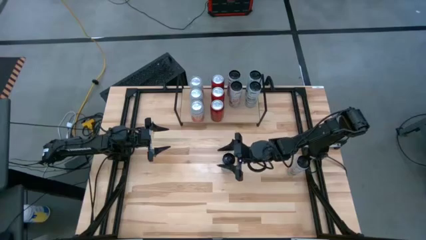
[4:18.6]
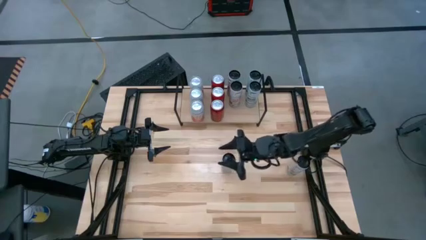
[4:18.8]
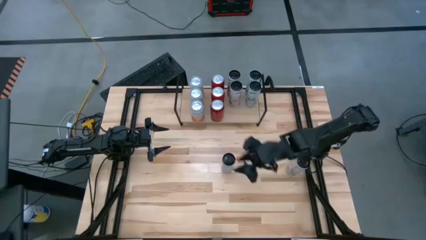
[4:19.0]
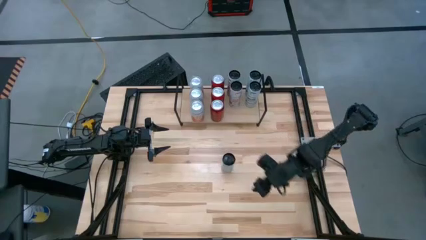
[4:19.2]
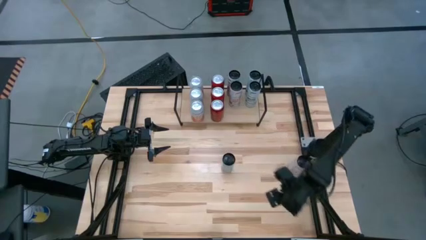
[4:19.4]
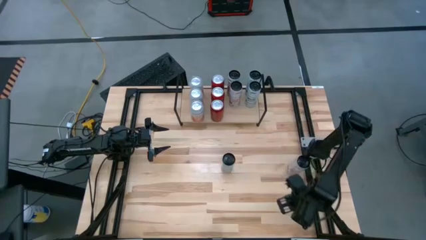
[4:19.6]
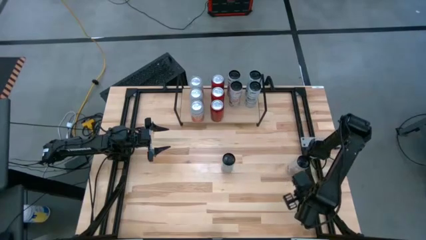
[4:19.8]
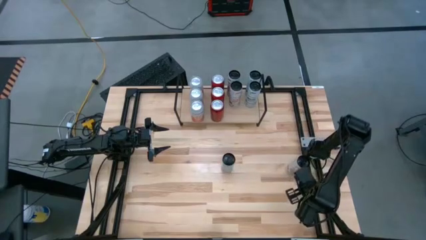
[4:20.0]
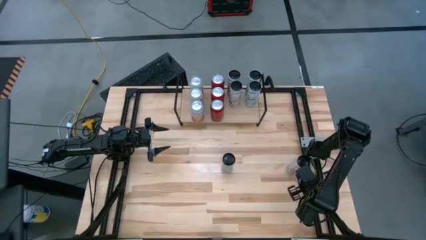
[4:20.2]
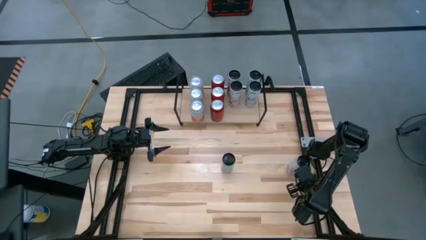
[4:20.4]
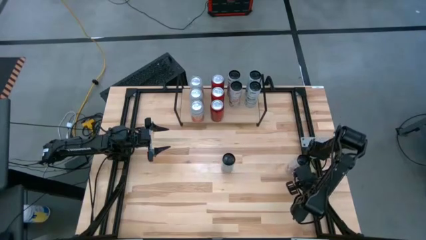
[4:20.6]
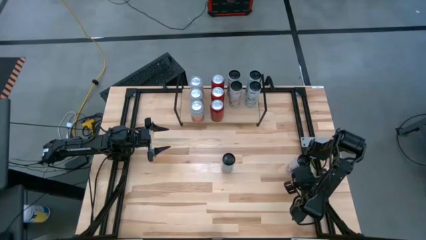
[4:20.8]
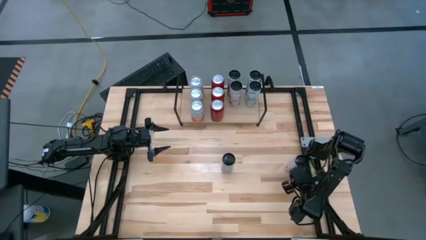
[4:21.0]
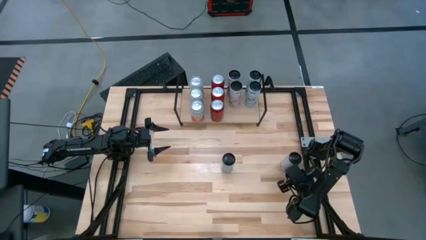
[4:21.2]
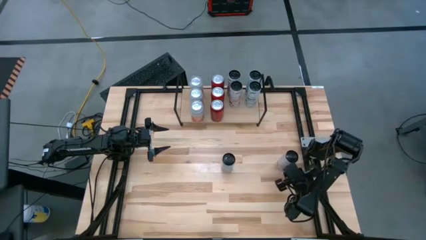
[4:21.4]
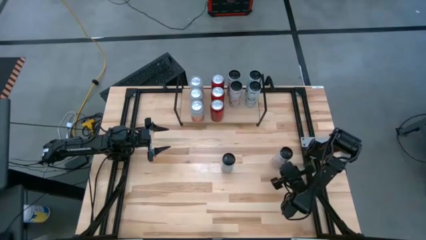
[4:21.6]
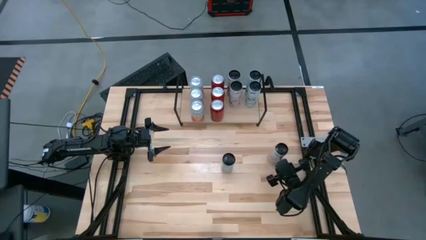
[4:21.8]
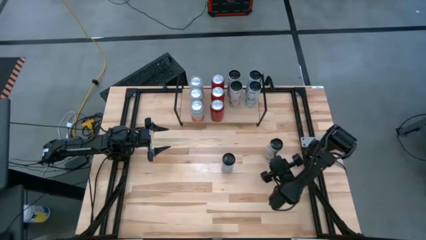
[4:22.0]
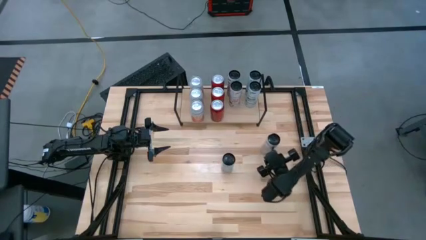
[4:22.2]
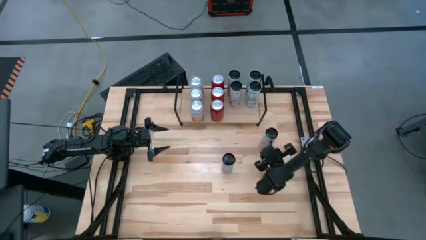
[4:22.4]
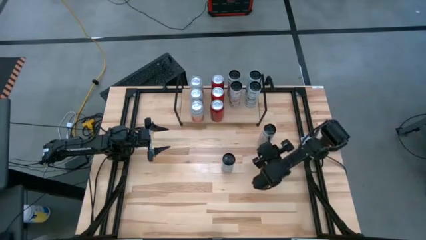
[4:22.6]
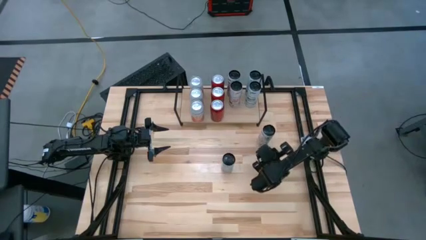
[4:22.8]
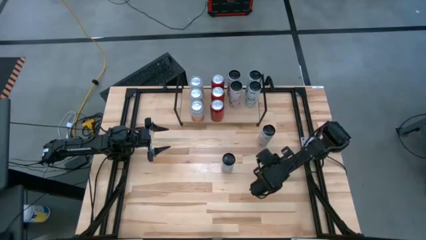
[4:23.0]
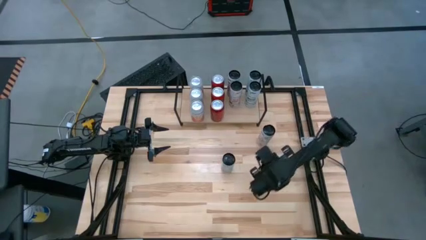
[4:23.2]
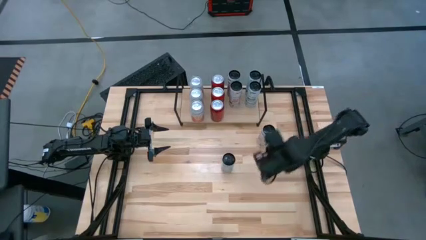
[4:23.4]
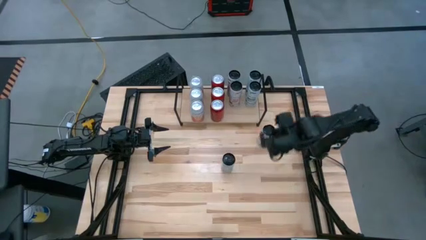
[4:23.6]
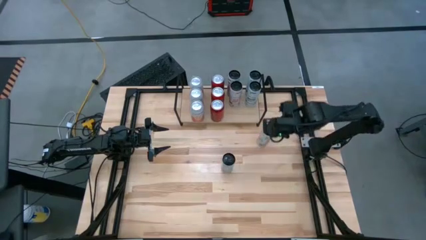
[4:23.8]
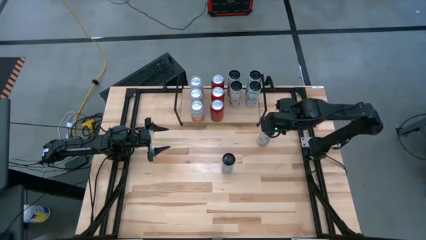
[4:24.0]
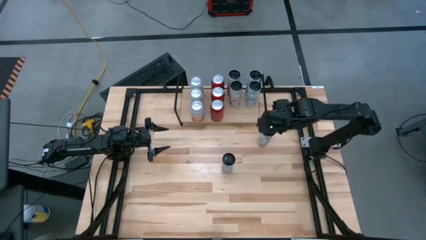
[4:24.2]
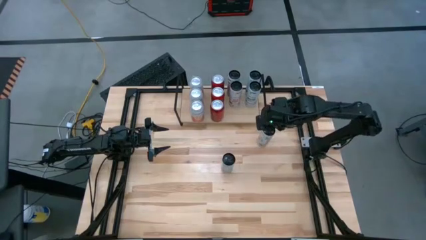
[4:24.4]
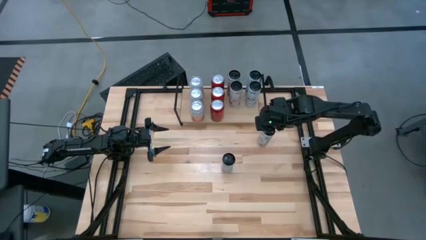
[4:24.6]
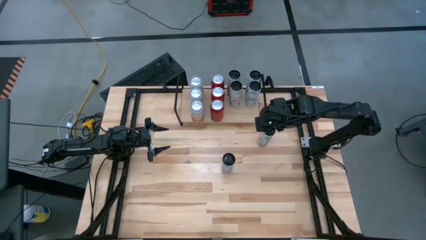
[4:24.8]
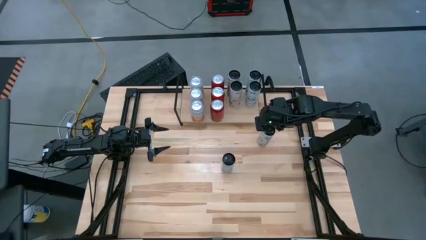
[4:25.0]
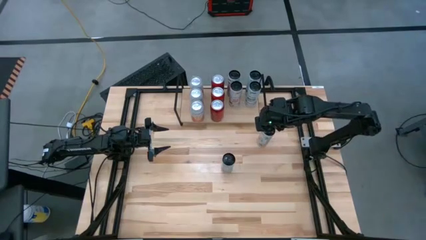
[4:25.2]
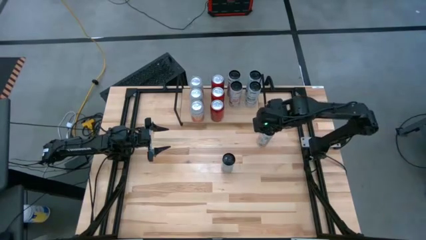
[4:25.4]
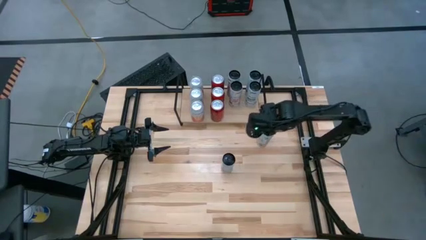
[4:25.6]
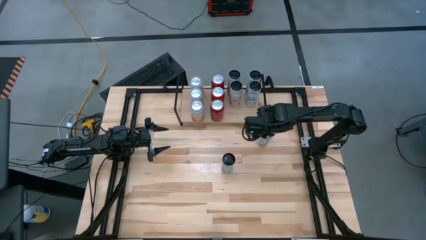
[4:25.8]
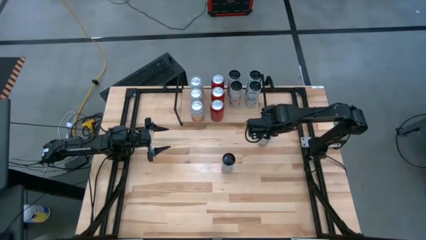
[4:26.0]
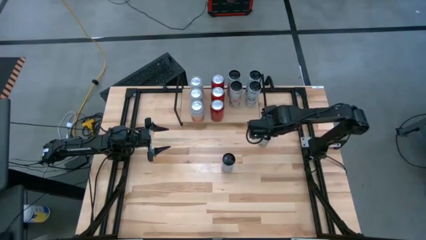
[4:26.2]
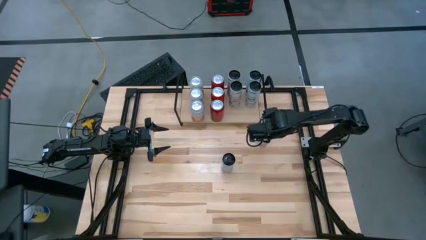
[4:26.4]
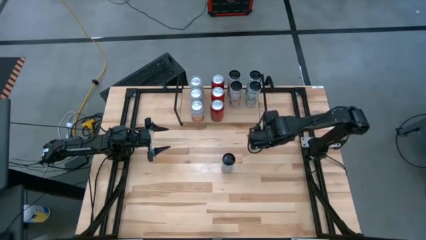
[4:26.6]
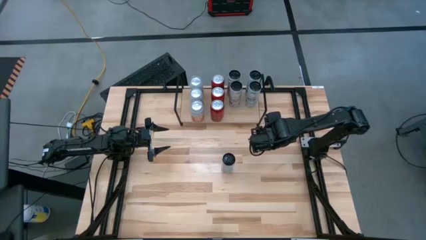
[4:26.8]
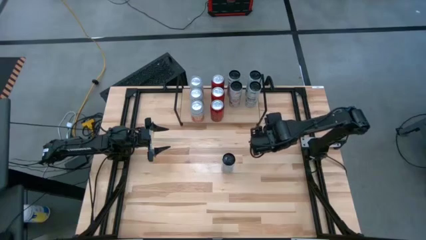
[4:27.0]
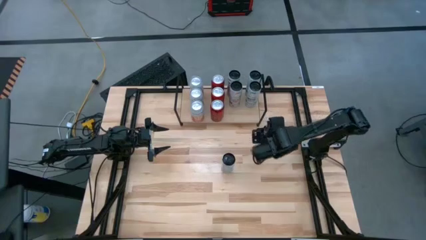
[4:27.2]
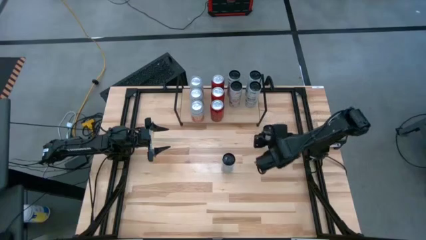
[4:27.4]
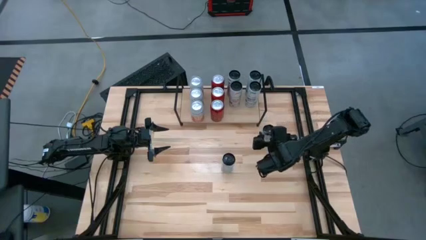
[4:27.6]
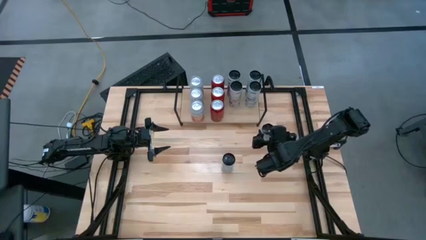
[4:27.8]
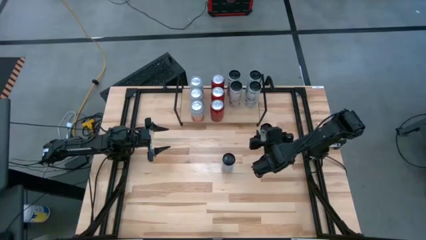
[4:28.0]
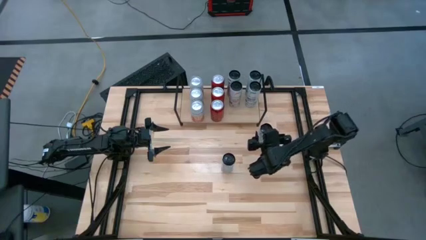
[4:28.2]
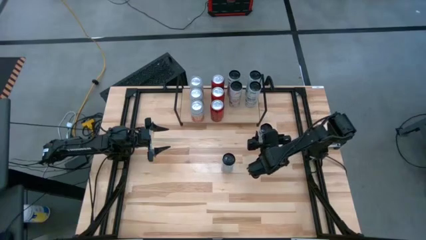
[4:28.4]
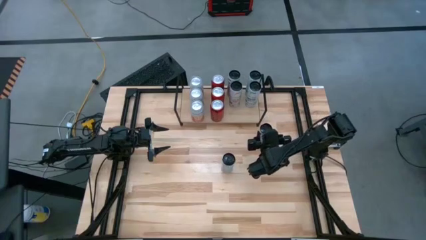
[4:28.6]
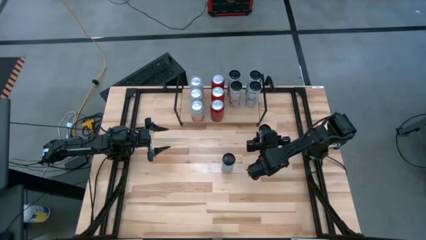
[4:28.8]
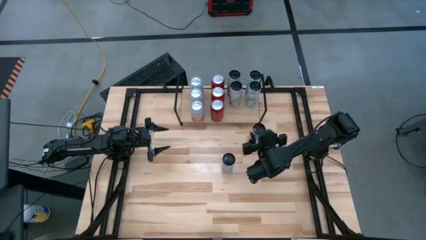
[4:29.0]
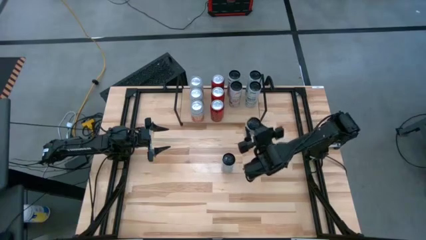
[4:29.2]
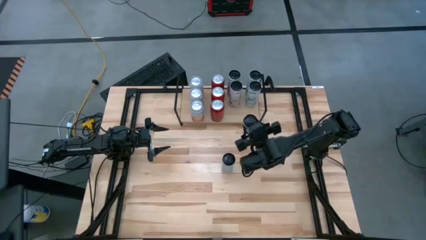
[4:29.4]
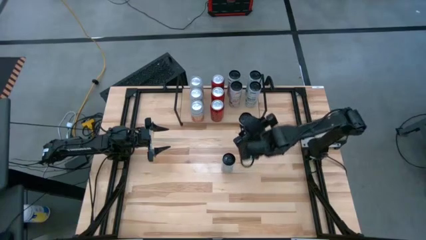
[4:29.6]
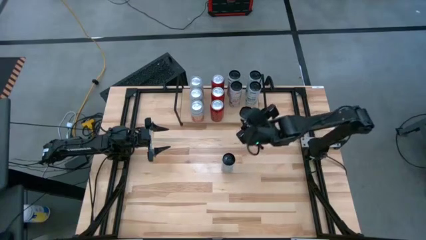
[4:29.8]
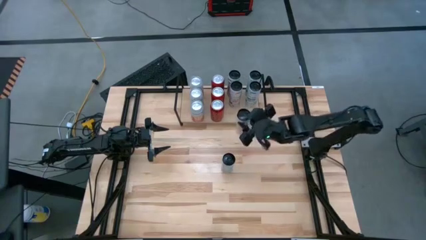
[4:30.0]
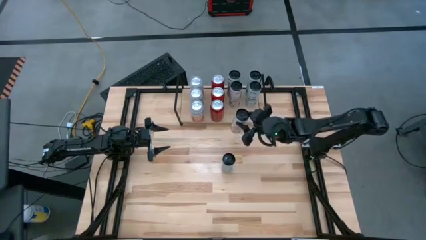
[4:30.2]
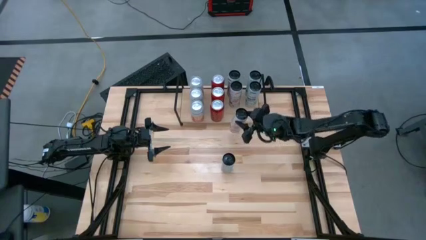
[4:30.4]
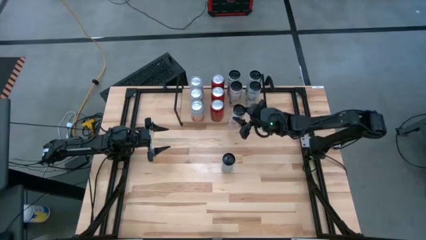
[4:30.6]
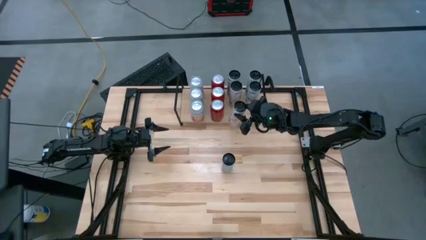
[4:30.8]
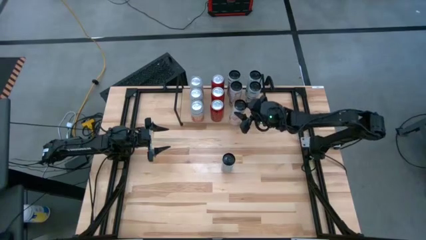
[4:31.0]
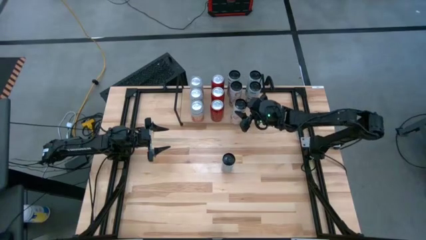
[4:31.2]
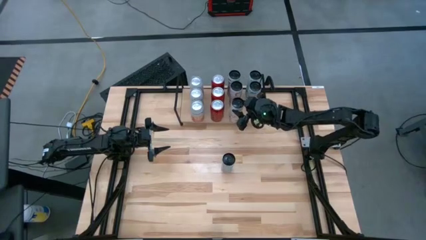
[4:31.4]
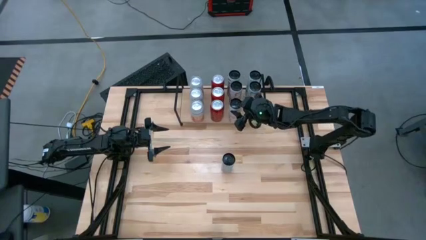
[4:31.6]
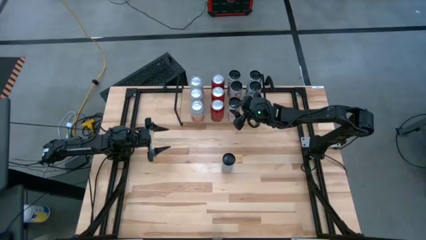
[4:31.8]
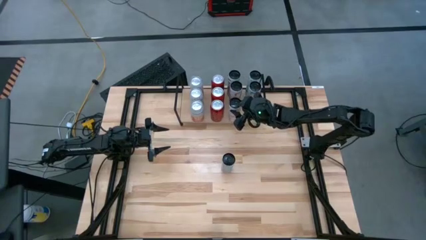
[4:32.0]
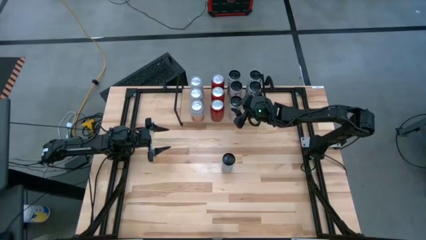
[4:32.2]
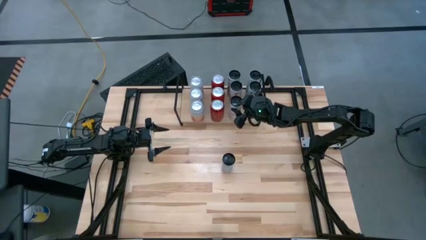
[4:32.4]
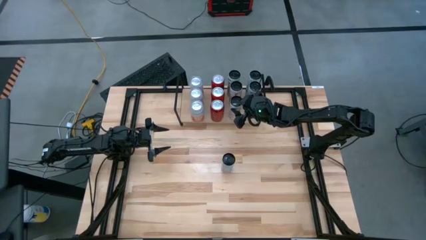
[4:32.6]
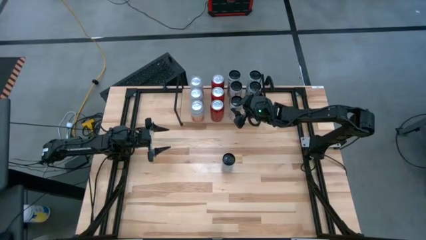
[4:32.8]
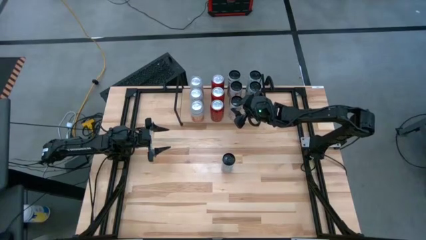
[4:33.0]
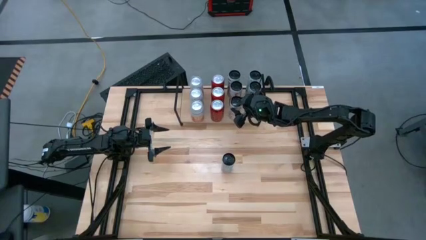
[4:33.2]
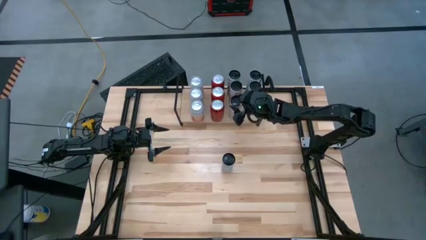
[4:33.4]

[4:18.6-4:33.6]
Task: Place canned beverage on shelf
Put the white pink soda can on the shelf aligned with the other white pink soda cans

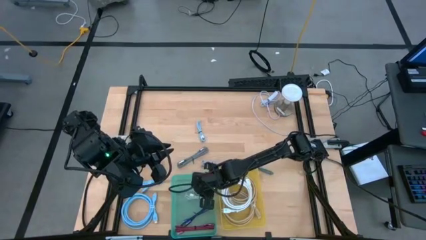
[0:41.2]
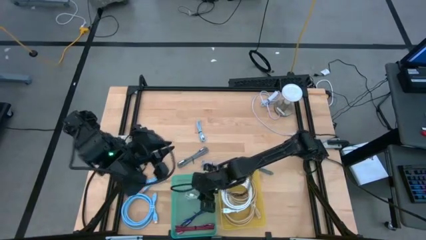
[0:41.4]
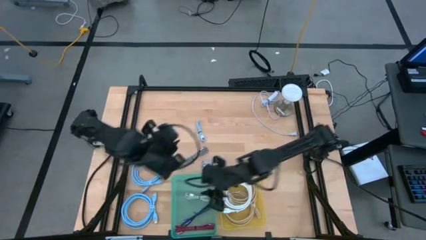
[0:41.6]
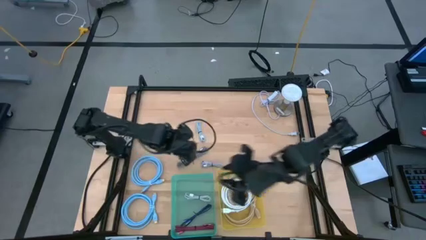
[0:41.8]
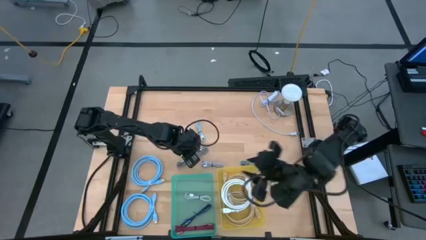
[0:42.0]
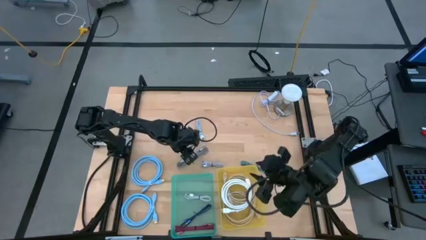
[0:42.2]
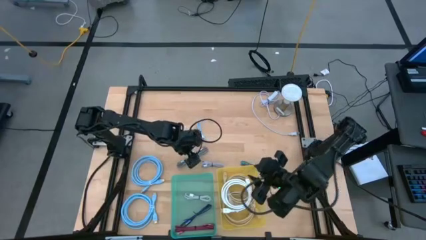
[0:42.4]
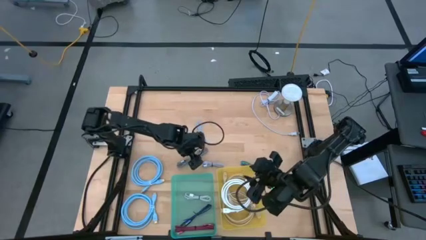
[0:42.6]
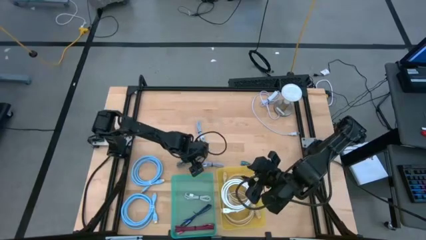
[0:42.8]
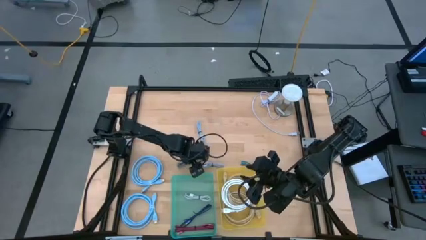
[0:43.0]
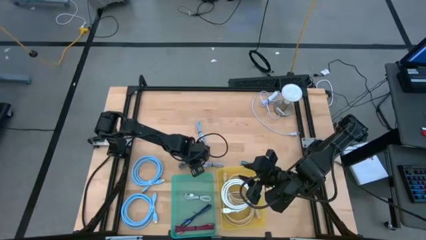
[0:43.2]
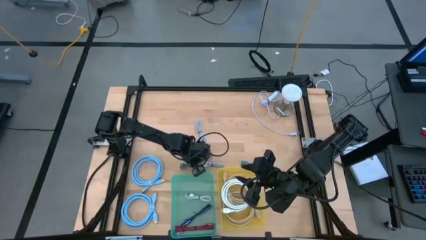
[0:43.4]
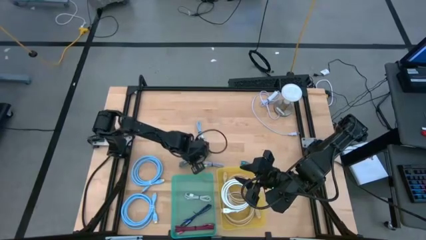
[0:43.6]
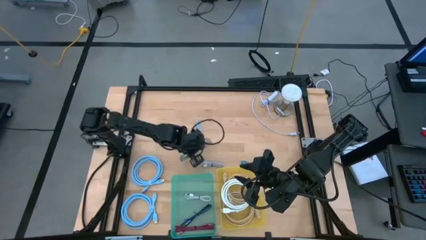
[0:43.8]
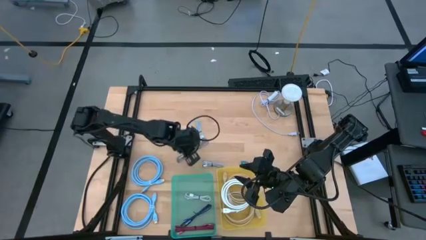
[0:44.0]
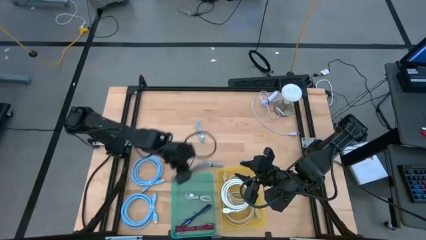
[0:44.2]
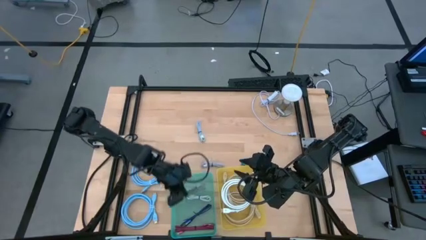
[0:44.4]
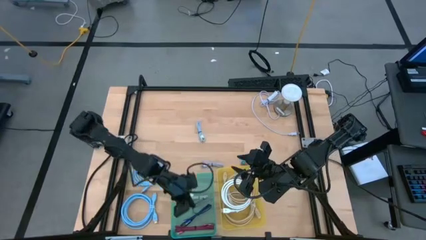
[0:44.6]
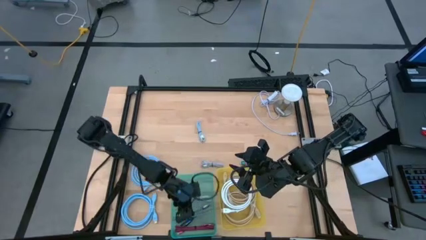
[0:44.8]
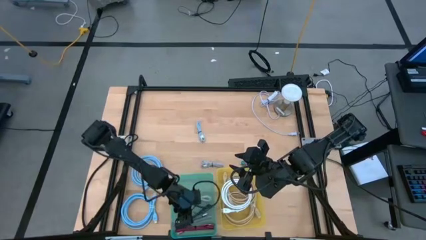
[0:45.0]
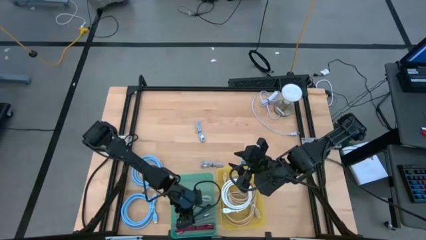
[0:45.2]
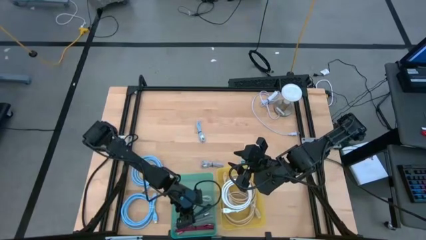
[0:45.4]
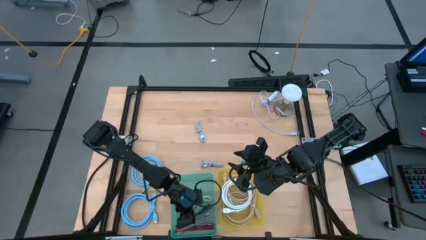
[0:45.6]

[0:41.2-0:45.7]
Task: Pick & Place USB Port
Put the black and white USB cable into the green bin
